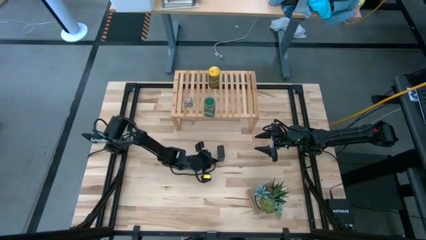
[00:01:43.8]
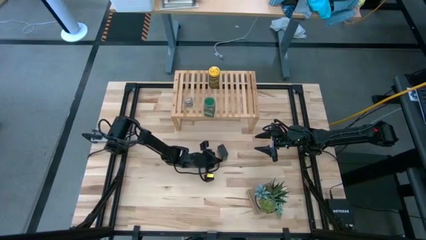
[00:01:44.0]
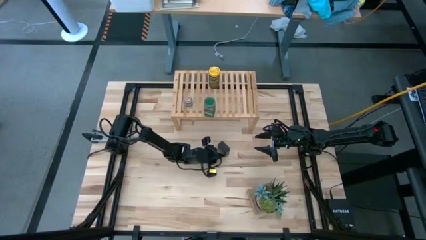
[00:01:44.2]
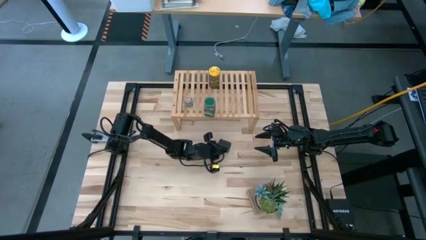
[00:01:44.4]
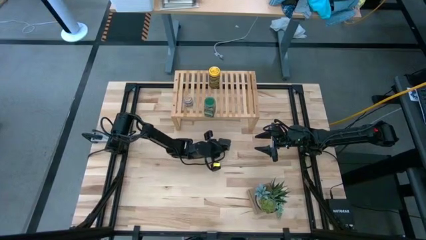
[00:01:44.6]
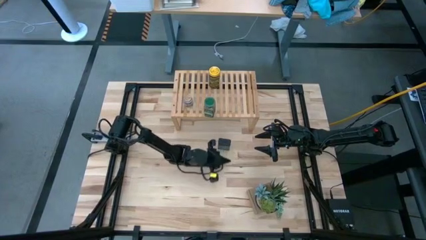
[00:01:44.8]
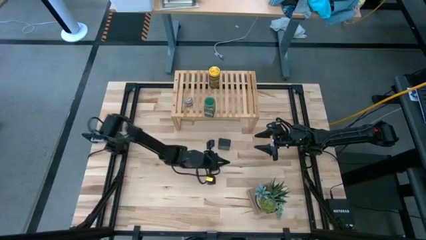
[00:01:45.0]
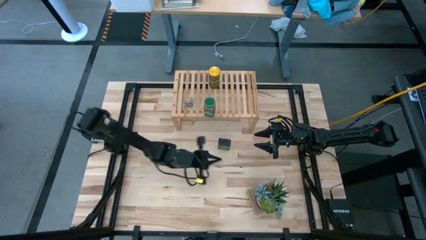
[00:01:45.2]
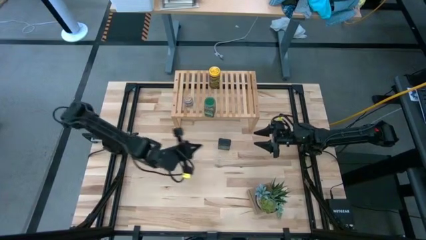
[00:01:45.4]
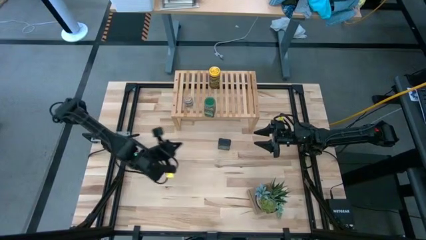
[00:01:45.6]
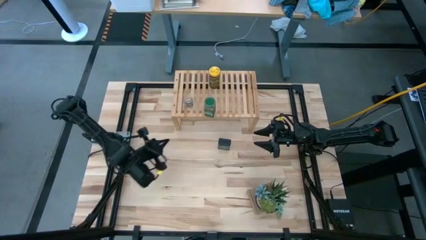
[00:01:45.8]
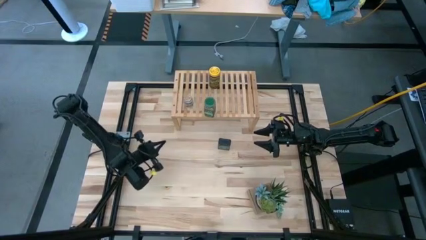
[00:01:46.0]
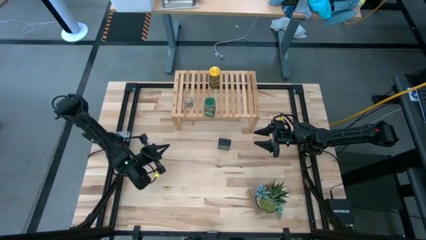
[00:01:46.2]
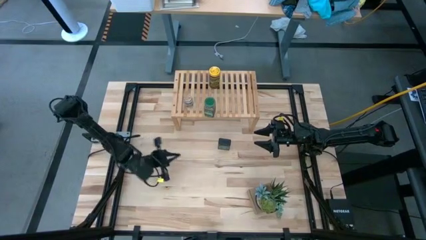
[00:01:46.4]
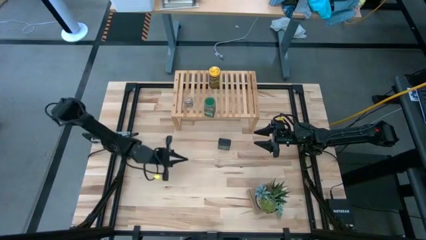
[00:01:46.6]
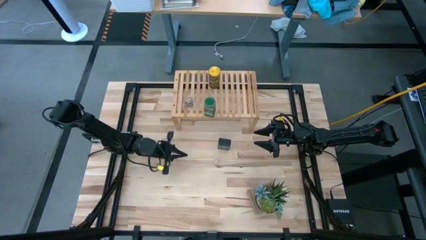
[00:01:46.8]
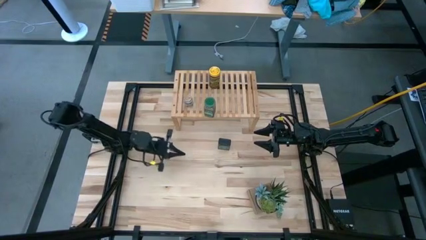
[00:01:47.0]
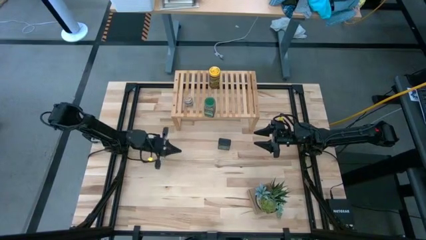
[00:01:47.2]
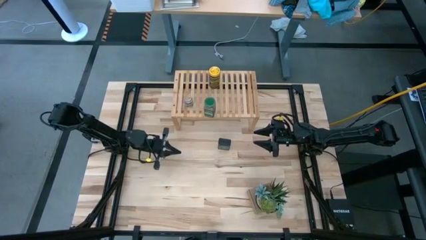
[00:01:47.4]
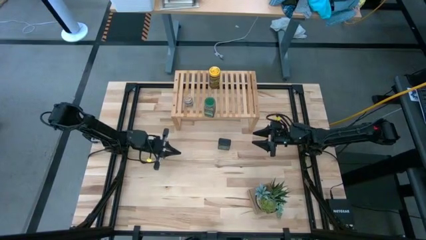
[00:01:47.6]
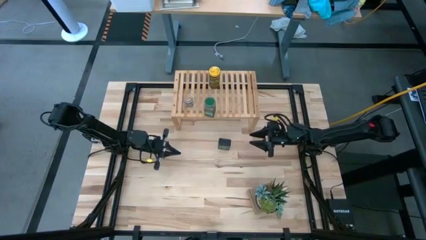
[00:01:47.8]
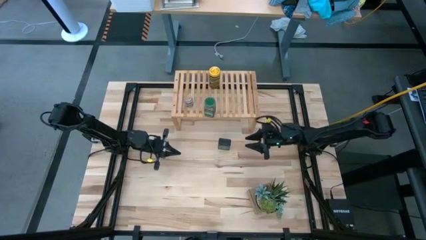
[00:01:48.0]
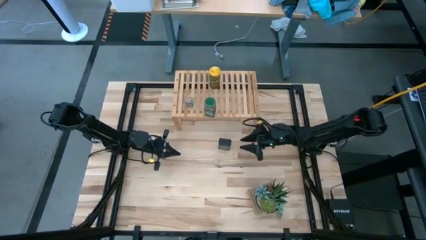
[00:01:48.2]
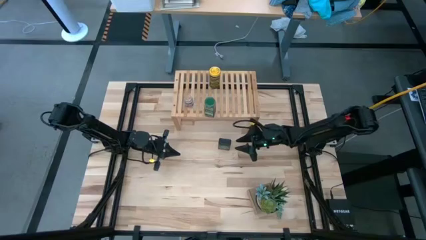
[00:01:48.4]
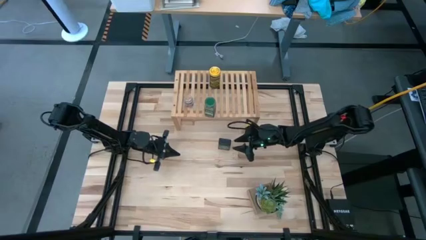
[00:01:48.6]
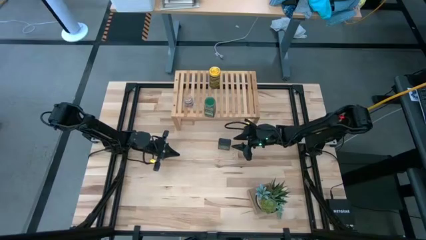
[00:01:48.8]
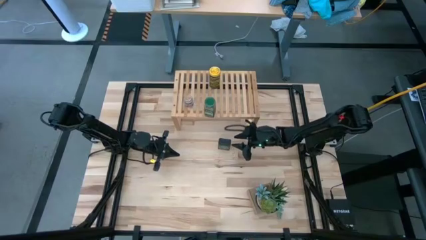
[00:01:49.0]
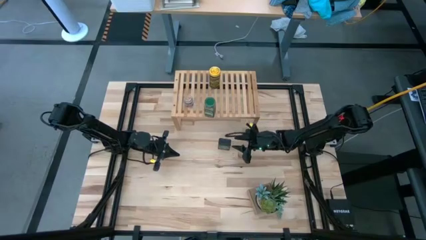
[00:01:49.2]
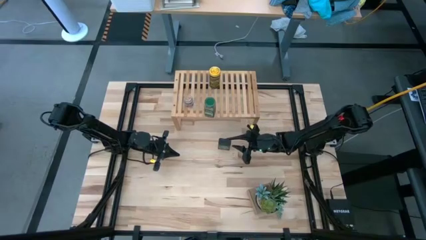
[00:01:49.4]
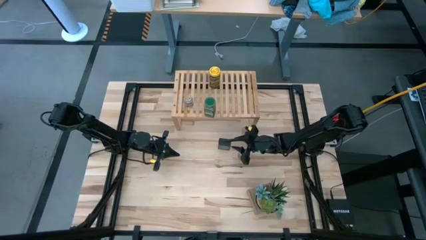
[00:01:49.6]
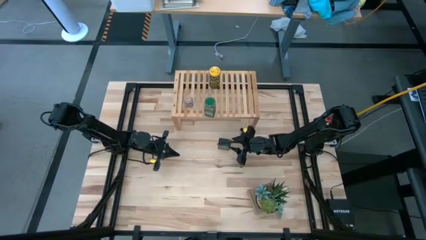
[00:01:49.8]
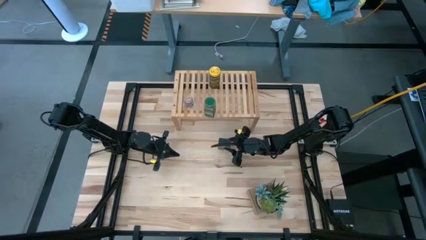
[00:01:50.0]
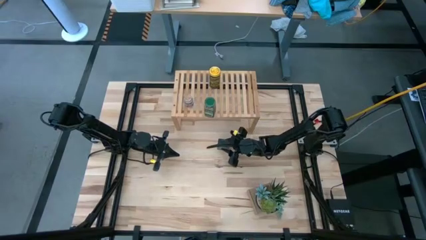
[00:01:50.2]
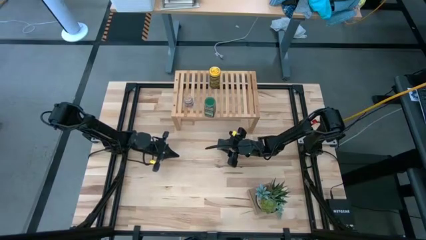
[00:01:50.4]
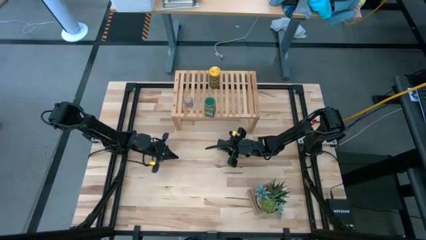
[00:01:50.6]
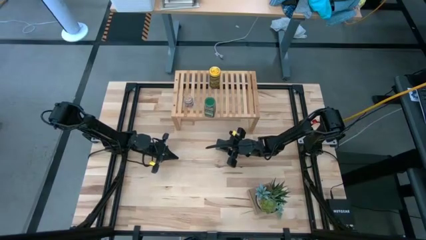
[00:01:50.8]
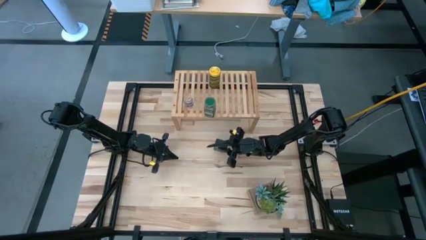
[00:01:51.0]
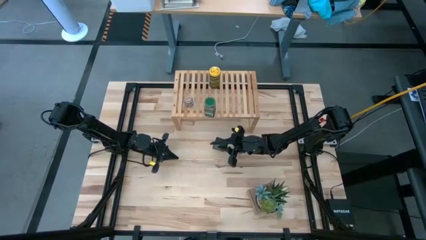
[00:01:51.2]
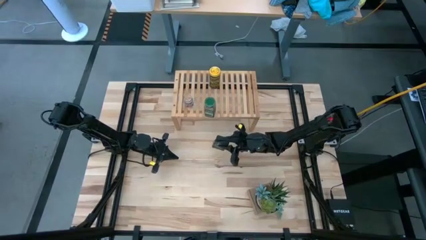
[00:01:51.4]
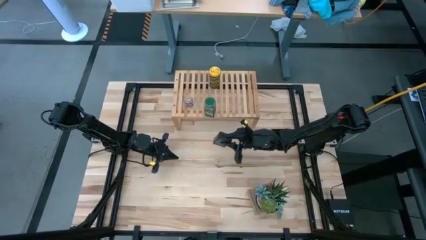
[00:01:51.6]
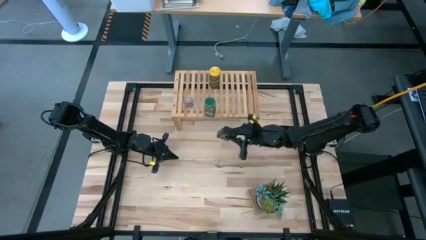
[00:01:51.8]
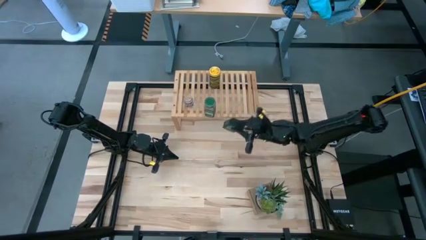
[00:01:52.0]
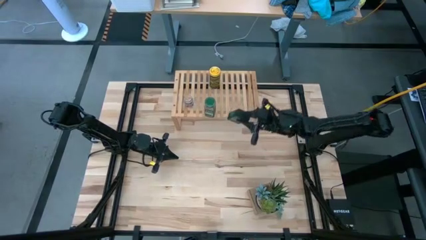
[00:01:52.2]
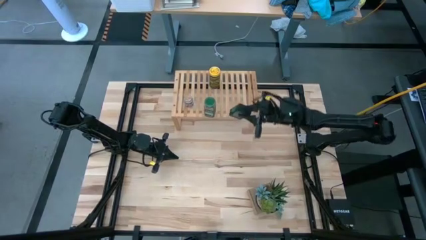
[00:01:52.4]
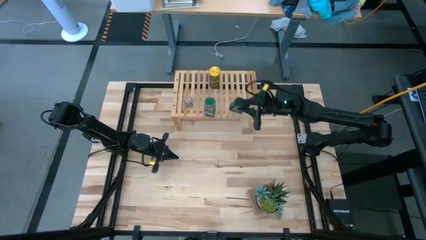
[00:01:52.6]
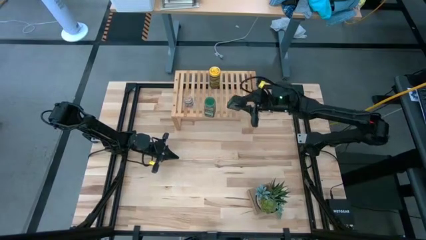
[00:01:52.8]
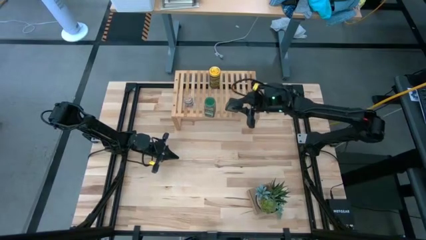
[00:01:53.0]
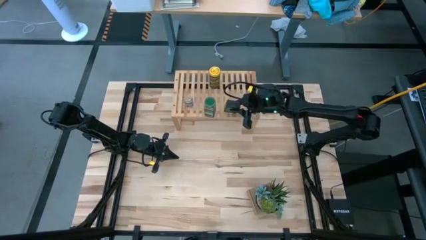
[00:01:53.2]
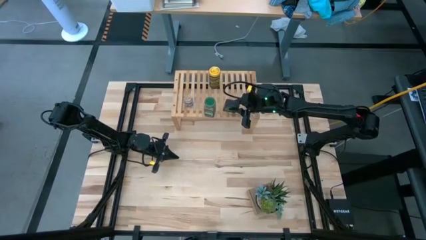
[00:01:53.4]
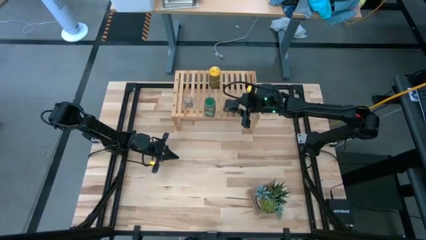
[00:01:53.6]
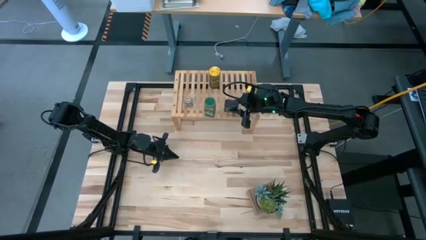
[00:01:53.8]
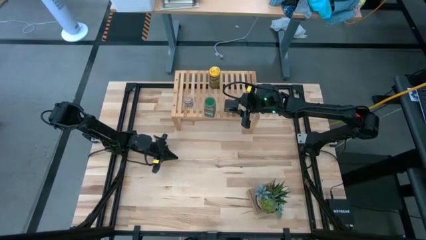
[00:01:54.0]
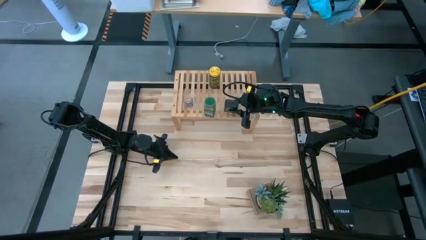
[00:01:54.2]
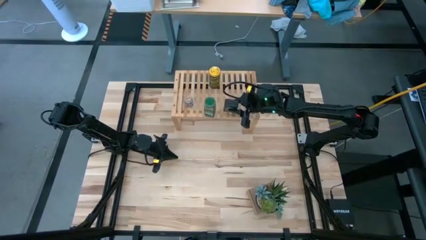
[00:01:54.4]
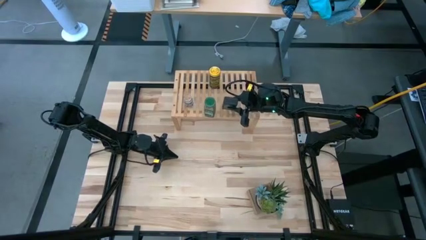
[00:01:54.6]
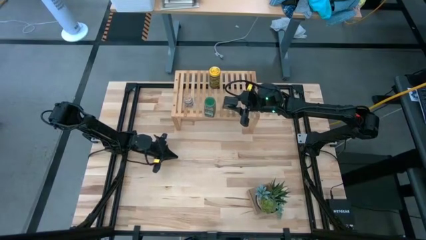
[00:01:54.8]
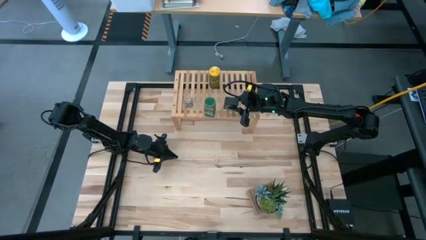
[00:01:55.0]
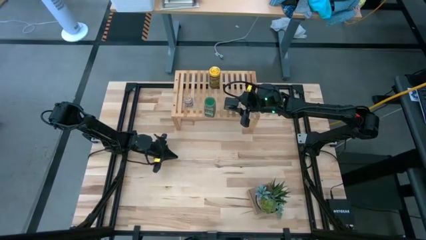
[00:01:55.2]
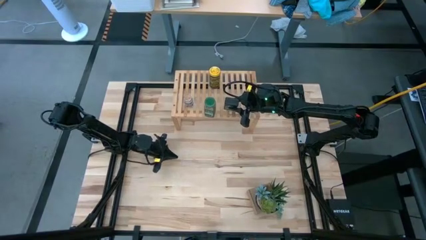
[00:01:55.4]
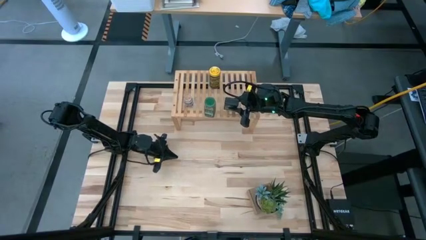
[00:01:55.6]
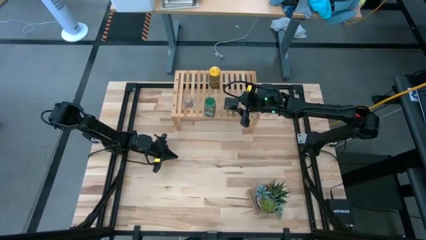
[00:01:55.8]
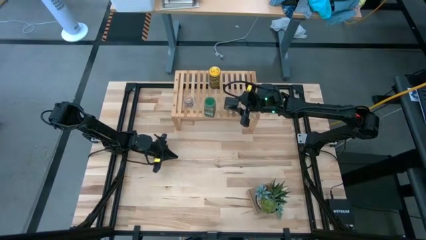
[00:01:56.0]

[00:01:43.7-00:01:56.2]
Task: Shelf spices
Put the black seasoning can on the shelf

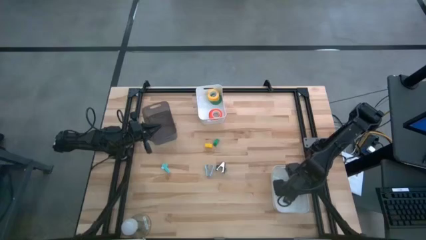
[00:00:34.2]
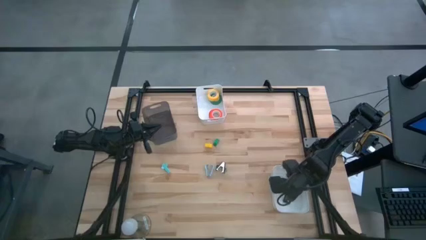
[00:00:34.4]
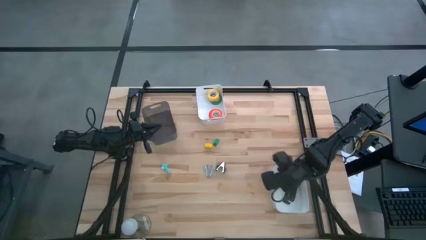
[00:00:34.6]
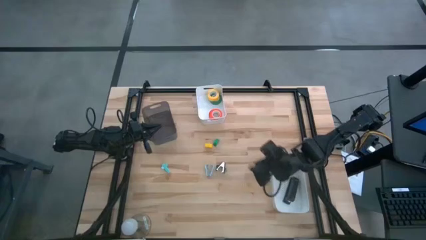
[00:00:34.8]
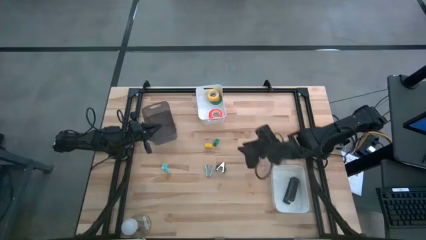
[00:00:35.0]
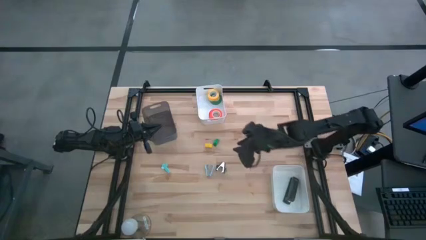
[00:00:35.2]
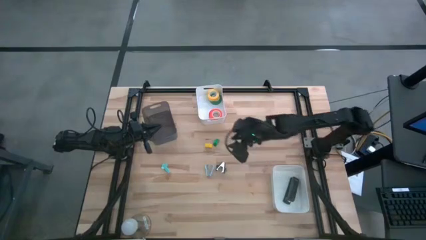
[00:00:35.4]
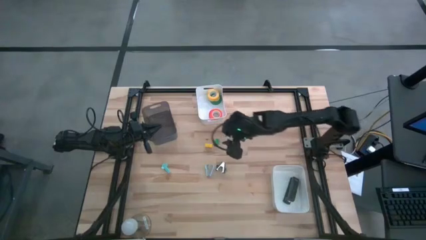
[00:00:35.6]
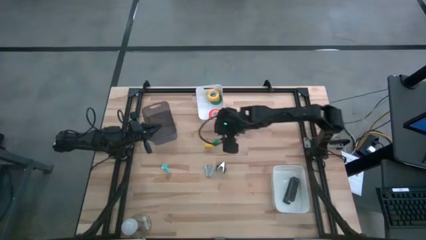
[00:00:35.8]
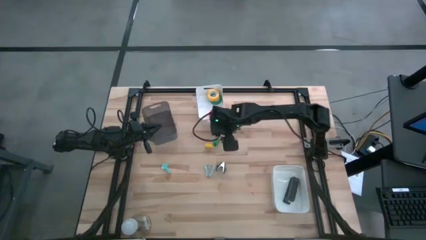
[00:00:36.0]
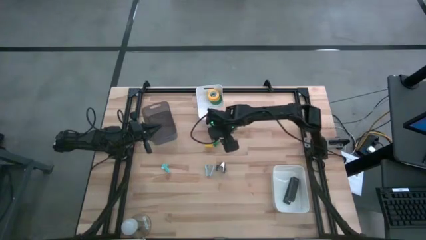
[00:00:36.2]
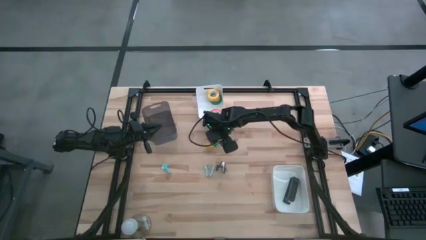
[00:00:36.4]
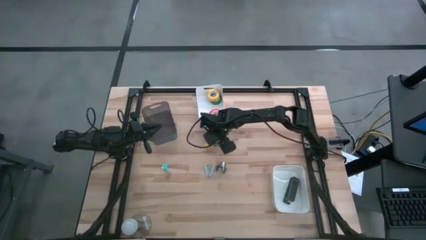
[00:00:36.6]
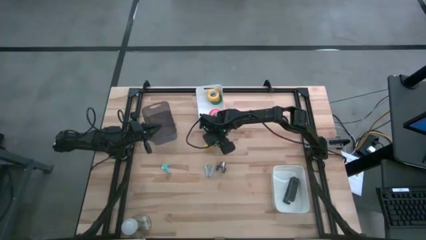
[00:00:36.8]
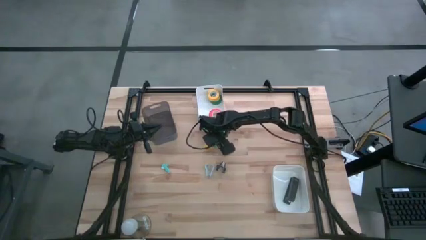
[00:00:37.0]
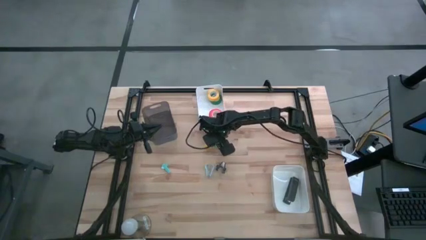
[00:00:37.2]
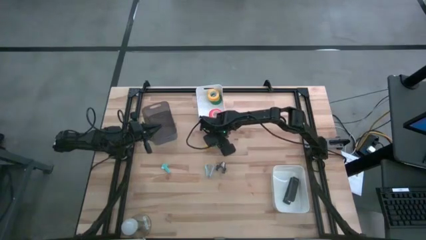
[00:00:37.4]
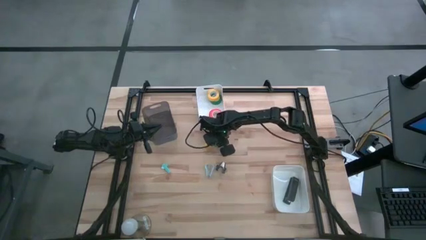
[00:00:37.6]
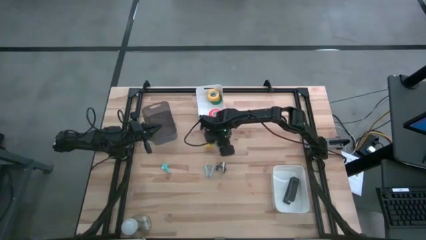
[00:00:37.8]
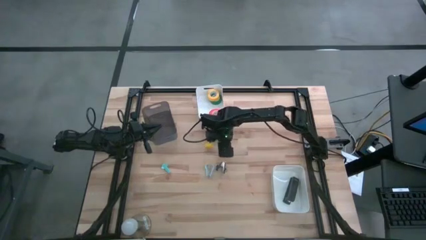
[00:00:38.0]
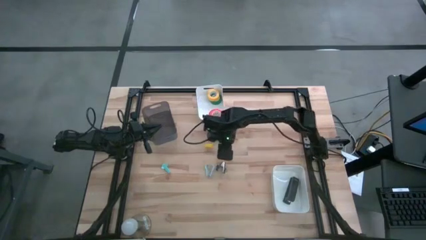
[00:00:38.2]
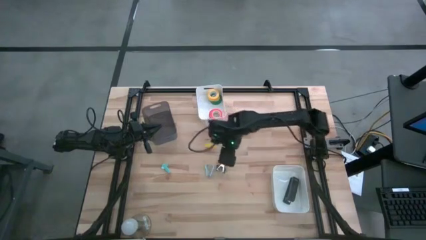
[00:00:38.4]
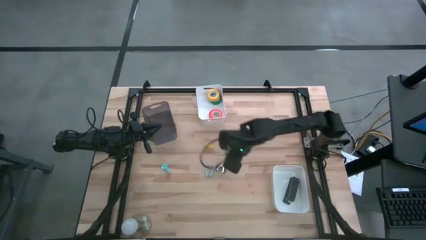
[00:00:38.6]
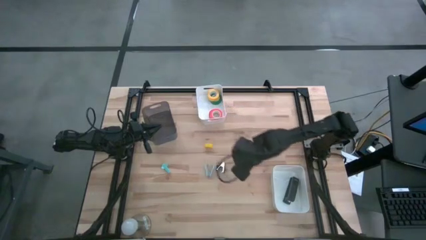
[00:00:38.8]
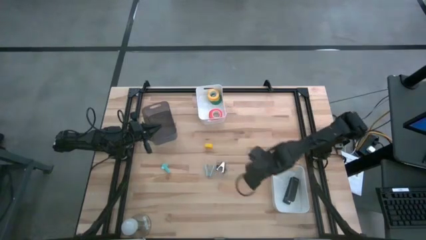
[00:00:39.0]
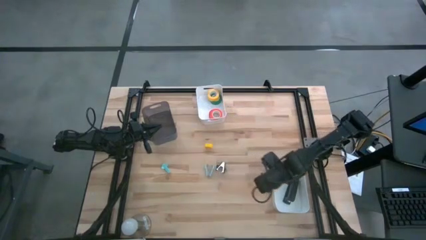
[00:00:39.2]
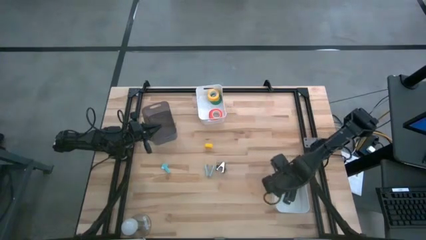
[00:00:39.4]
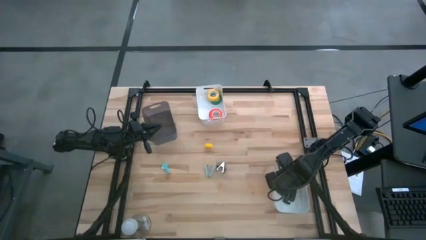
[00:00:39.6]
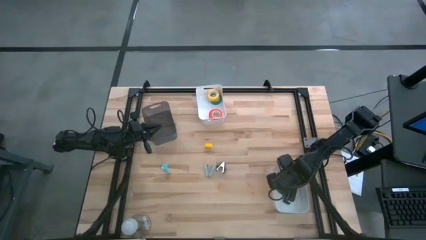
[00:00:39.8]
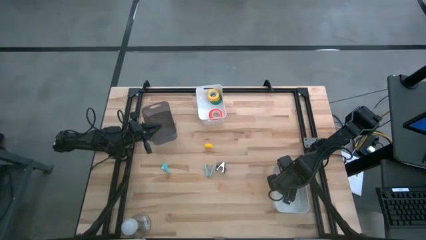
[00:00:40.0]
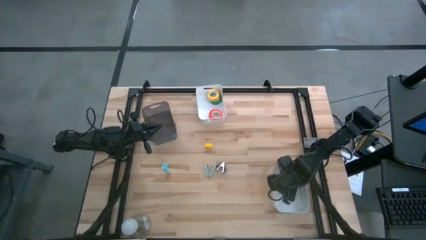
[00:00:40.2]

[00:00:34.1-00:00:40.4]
Task: Pick and place Stapler, Stapler remover, tape
Put the green stapler into the bottom white bin
